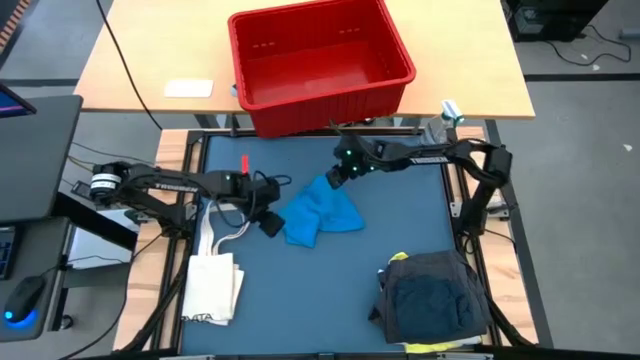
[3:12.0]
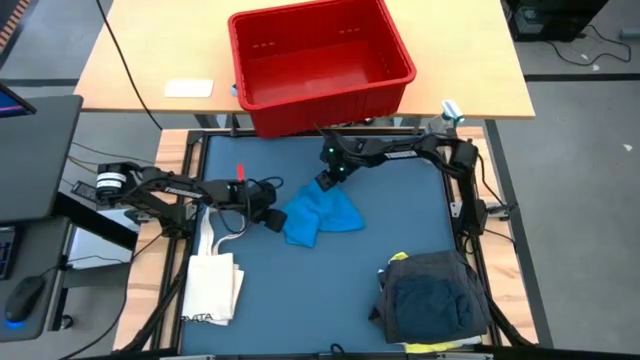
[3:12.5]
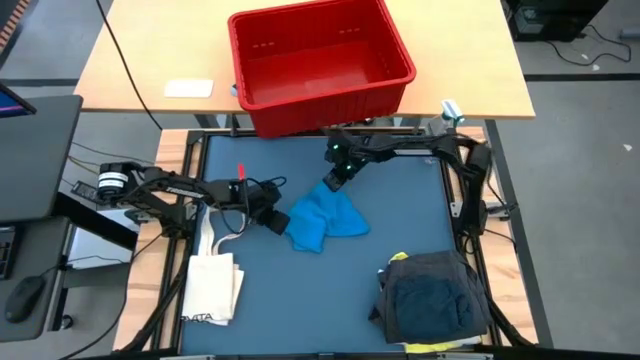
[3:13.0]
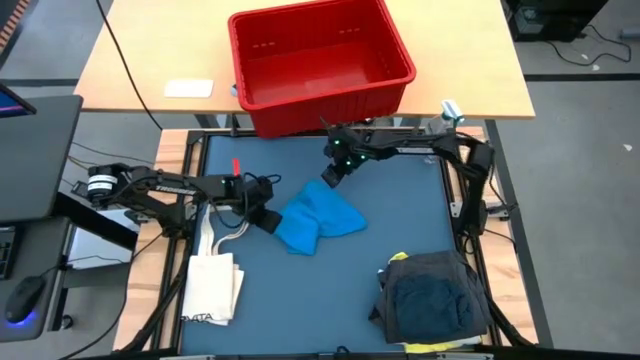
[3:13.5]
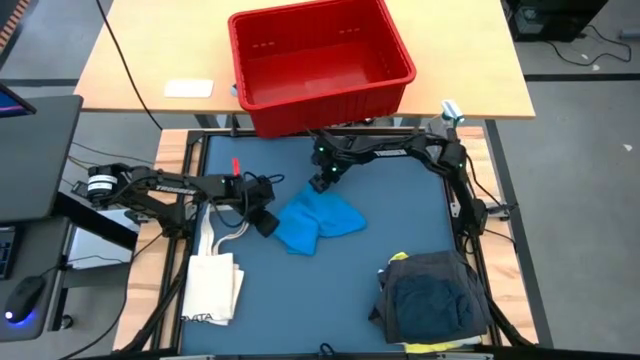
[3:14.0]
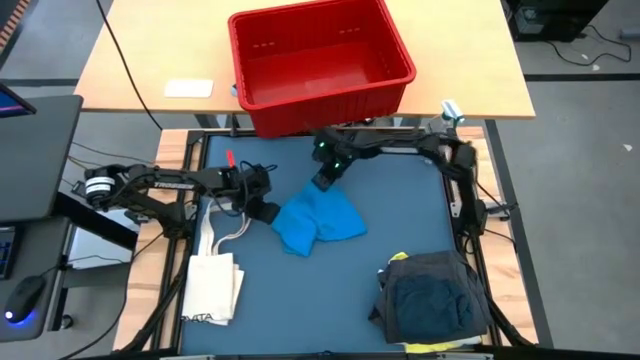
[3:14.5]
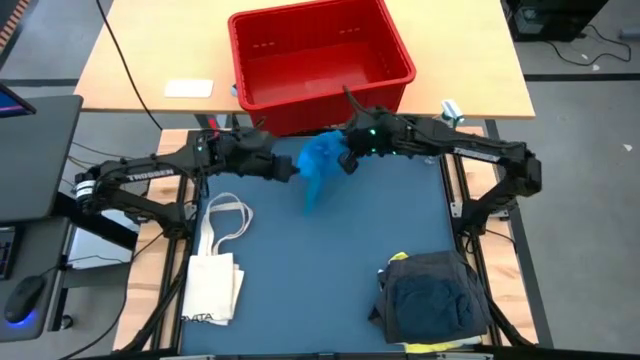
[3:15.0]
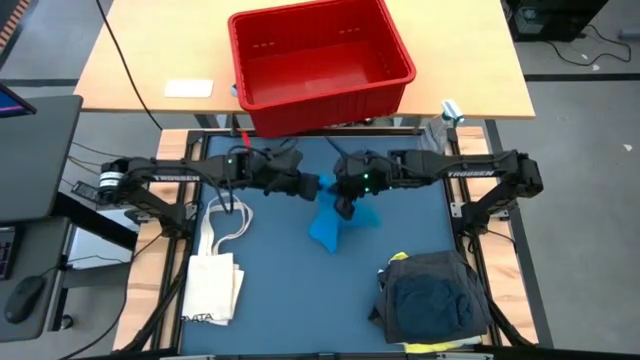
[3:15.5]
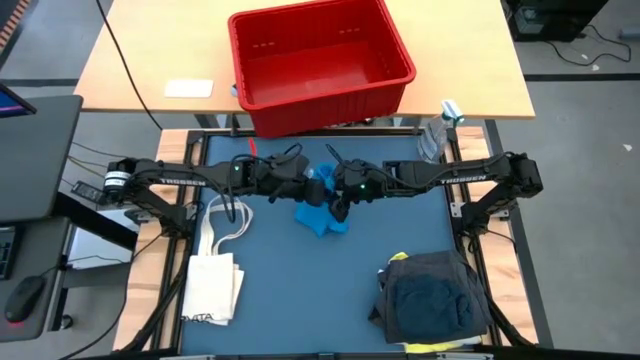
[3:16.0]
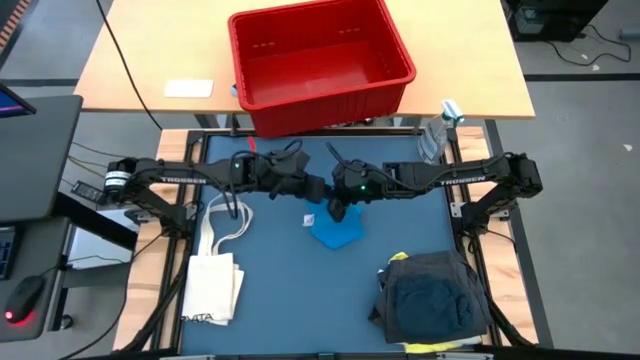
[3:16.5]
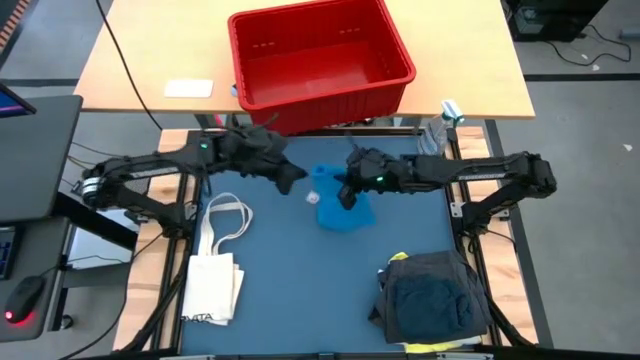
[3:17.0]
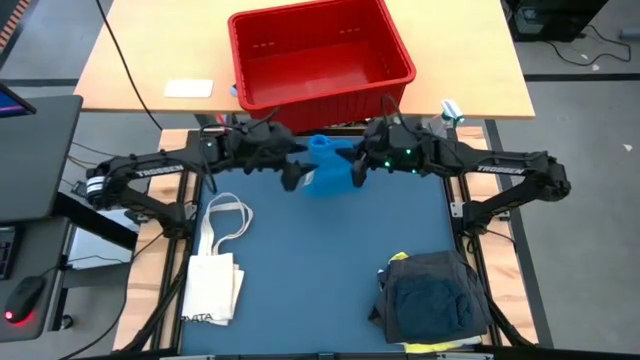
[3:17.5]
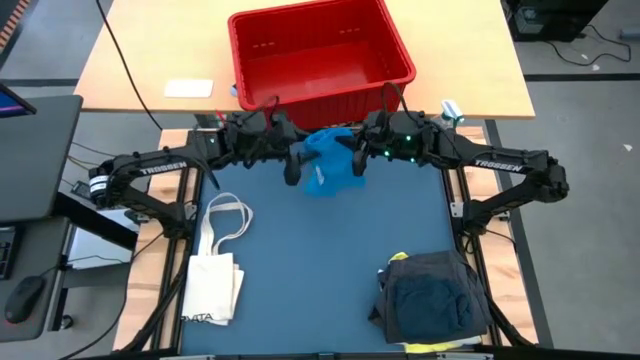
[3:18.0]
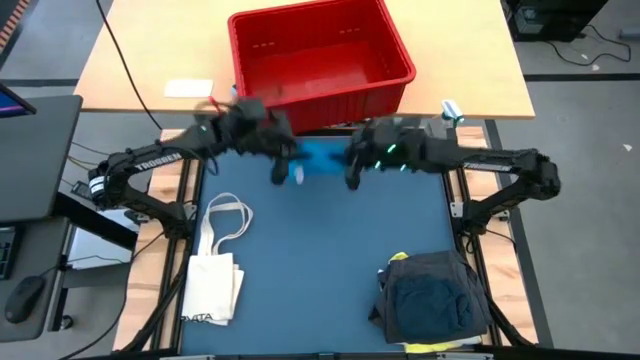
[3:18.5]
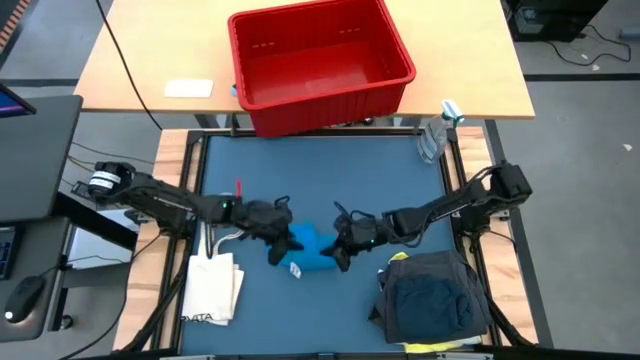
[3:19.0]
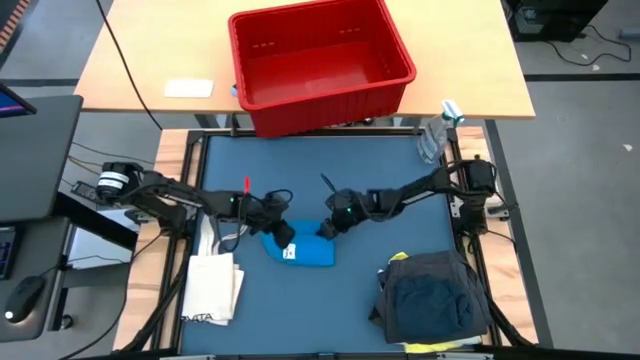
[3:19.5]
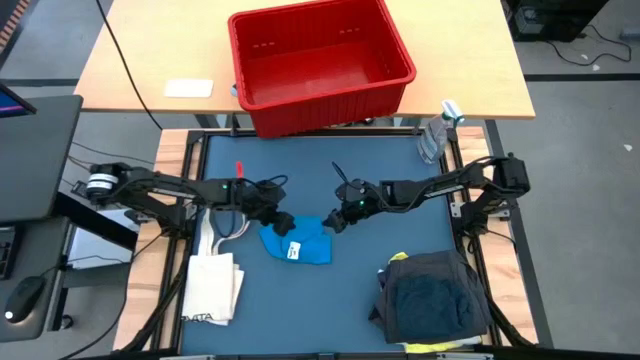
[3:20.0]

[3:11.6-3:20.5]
Task: Fold laundry
Fold the light blue boxer

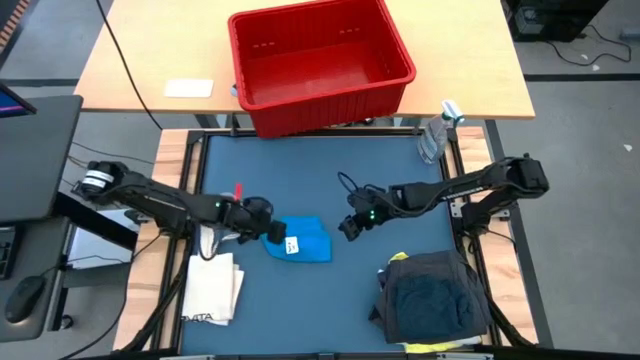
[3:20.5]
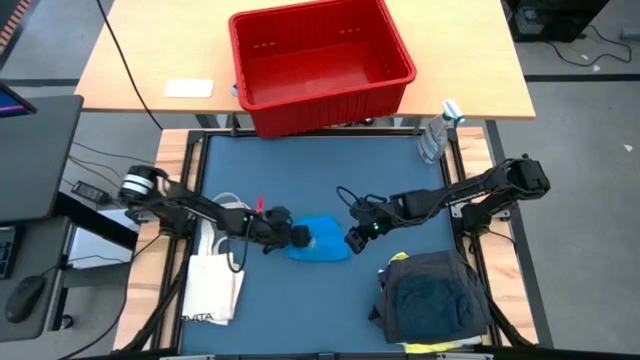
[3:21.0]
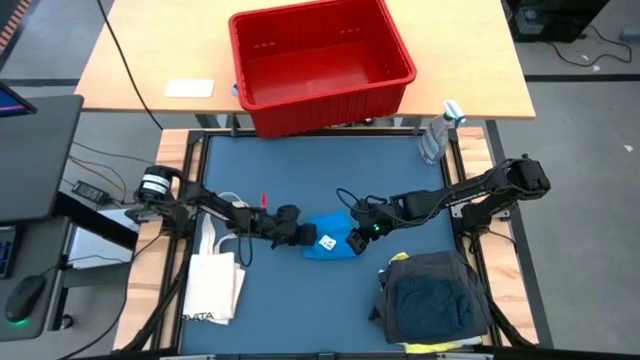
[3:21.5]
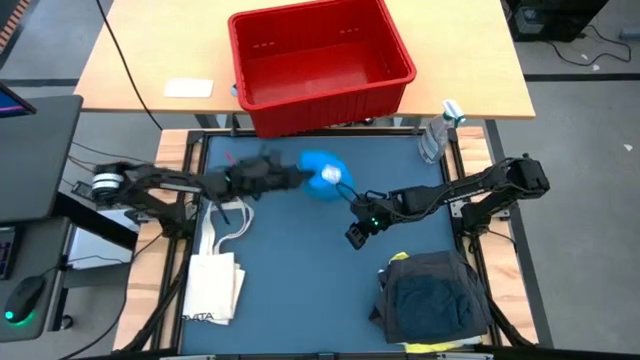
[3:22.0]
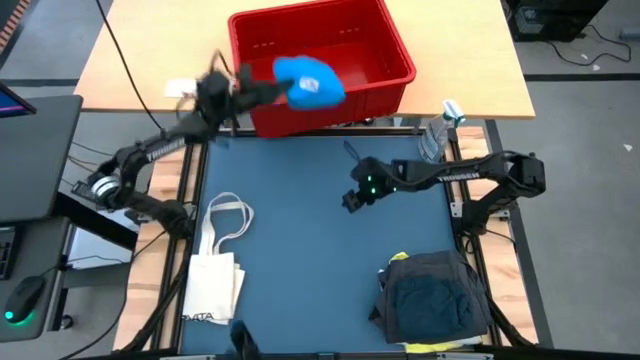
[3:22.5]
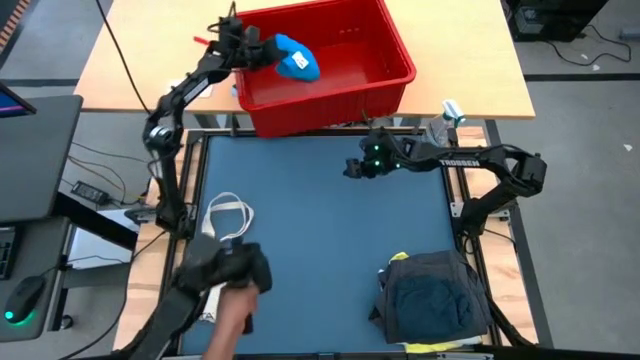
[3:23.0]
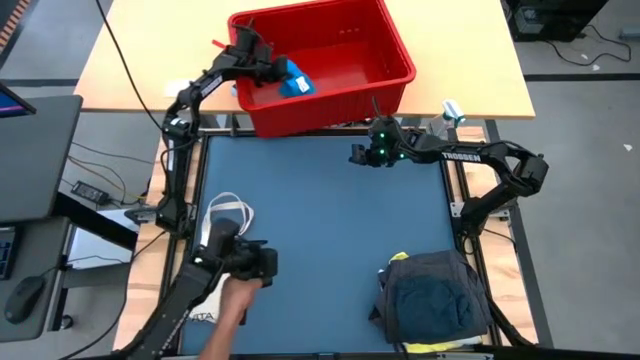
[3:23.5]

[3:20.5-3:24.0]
Put the light blue boxer into the red bin

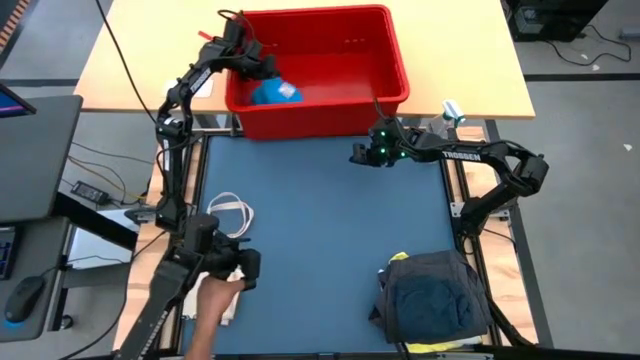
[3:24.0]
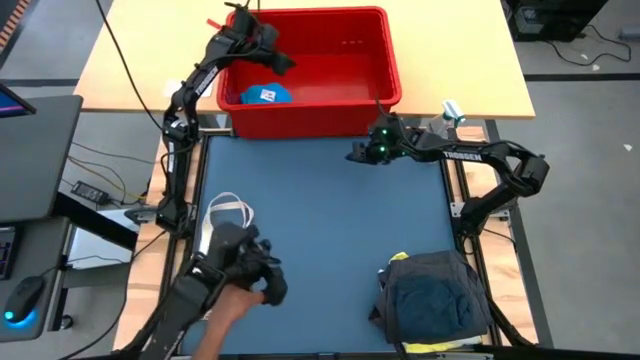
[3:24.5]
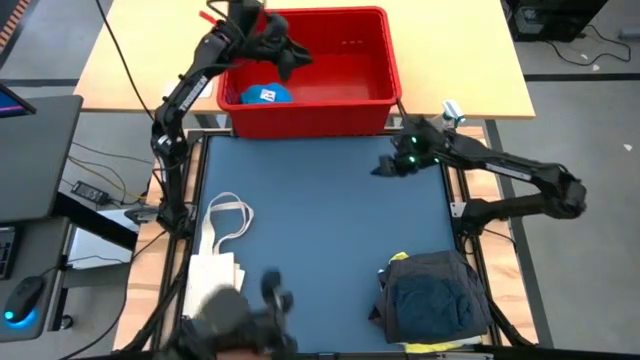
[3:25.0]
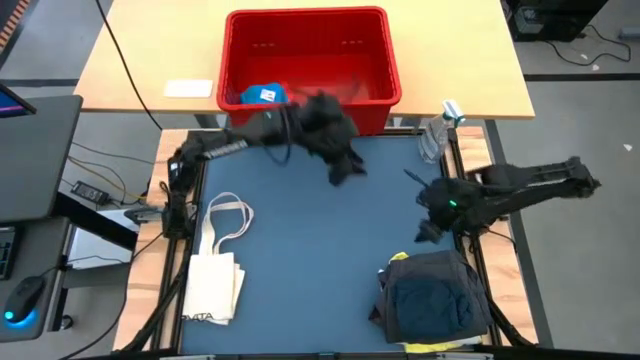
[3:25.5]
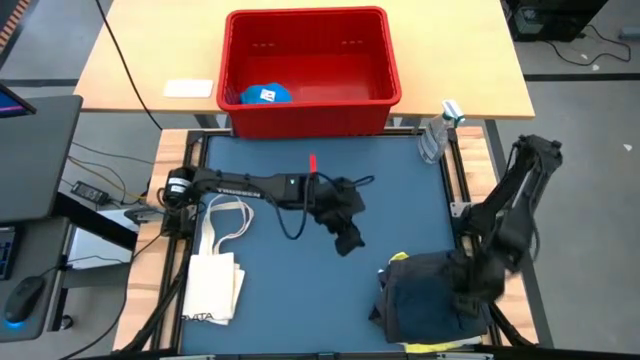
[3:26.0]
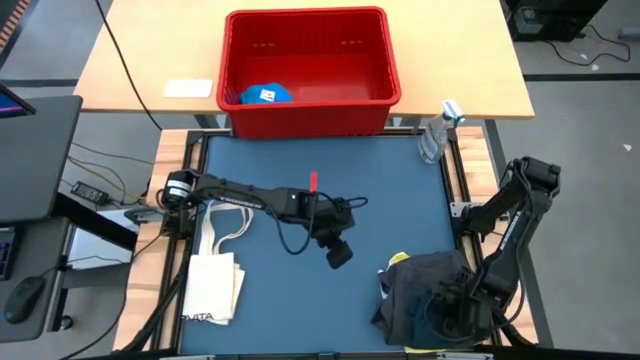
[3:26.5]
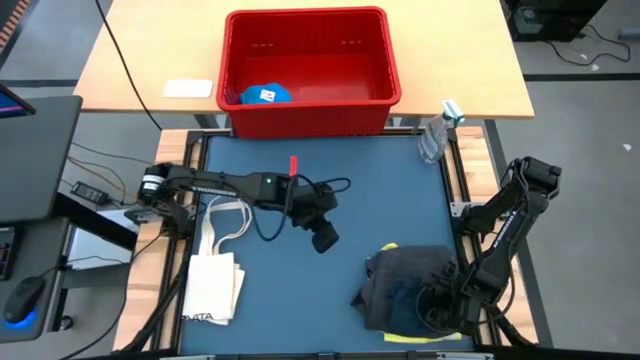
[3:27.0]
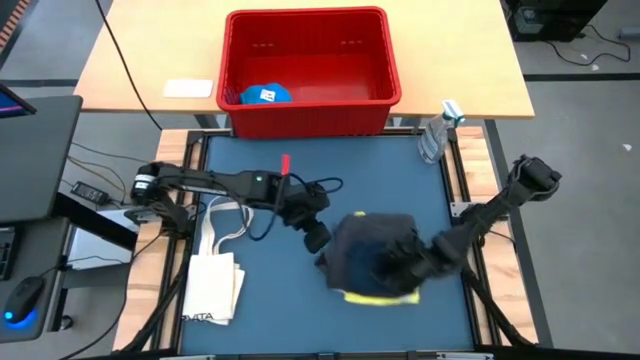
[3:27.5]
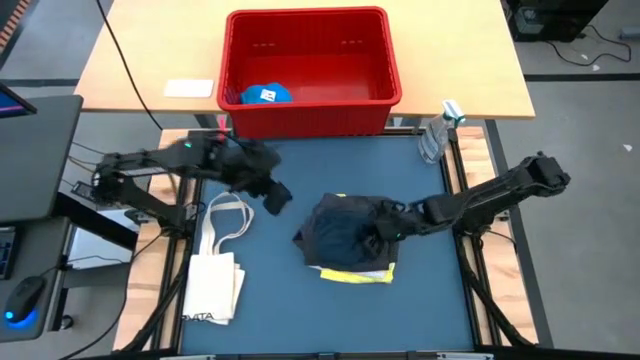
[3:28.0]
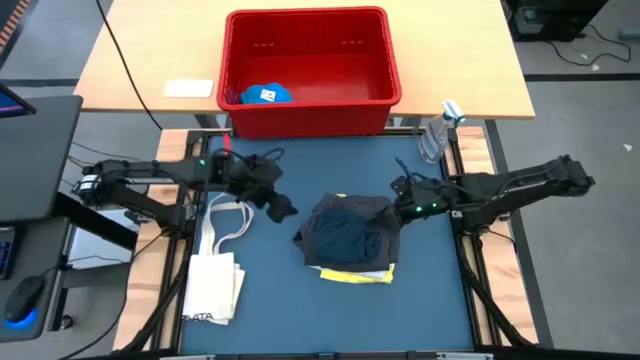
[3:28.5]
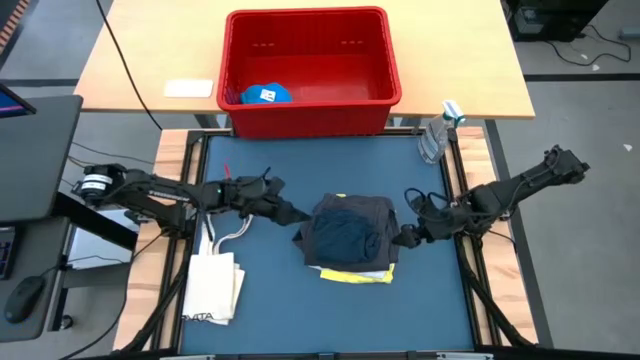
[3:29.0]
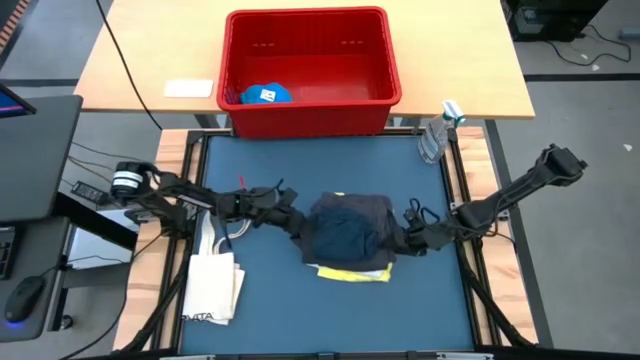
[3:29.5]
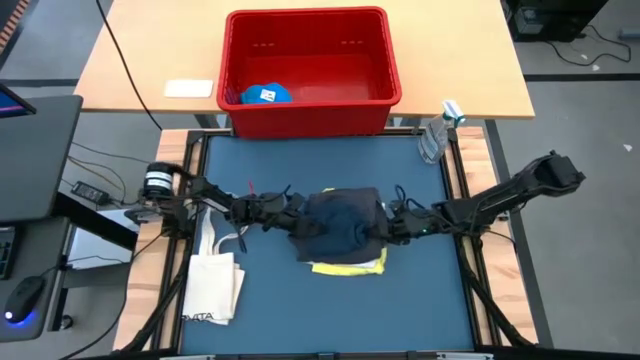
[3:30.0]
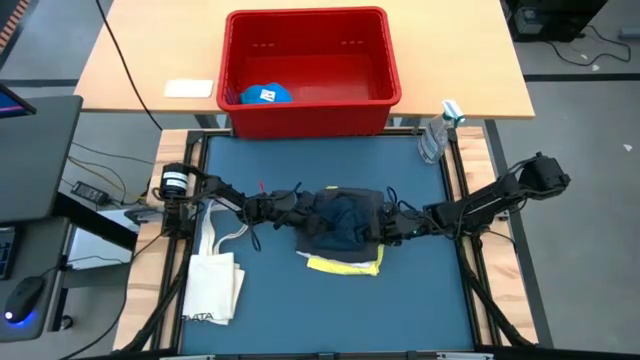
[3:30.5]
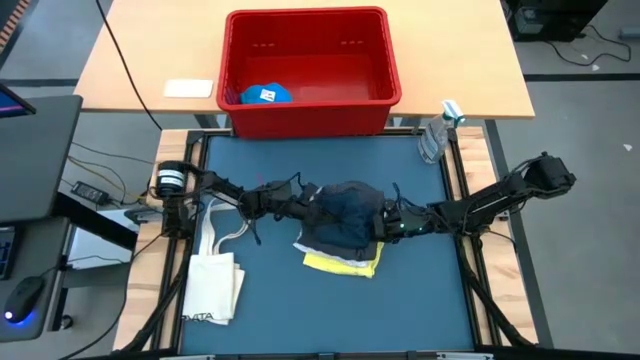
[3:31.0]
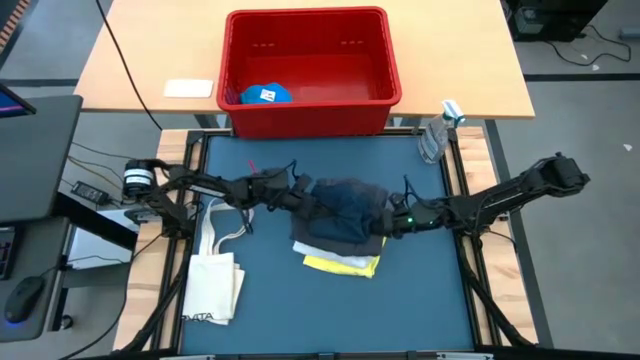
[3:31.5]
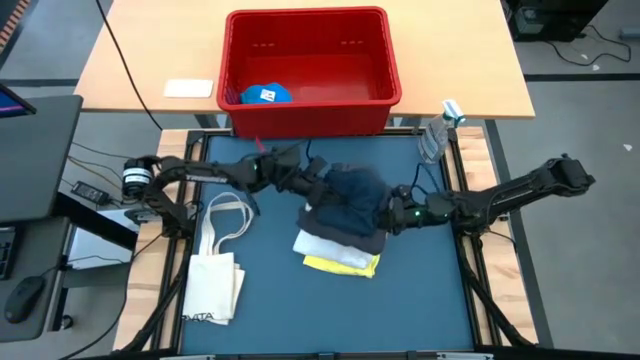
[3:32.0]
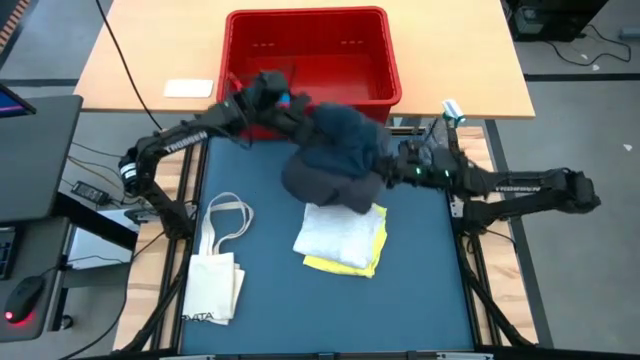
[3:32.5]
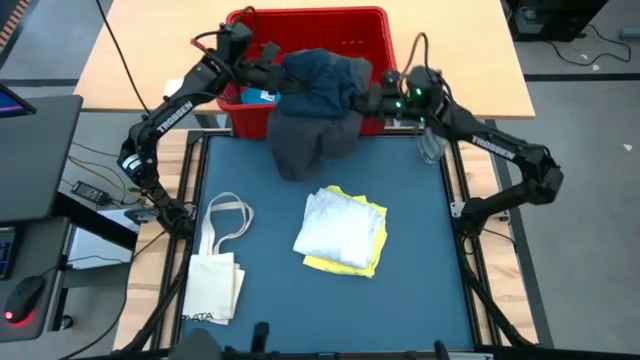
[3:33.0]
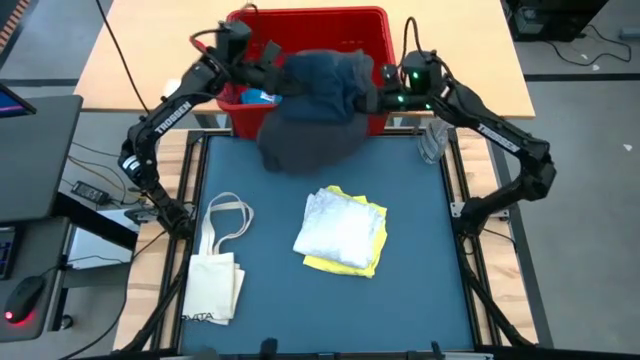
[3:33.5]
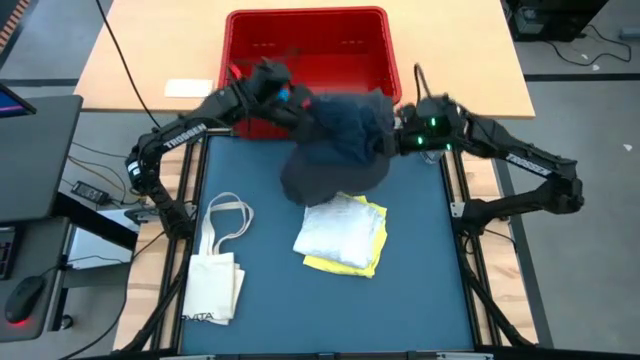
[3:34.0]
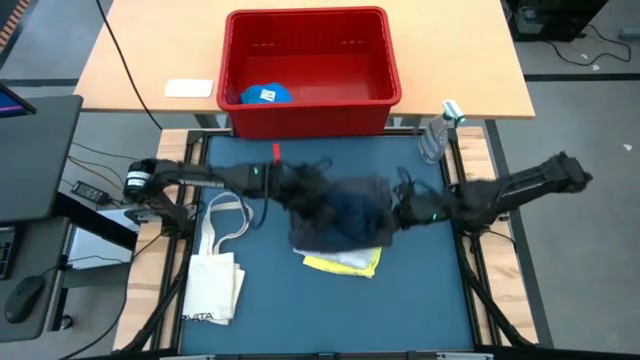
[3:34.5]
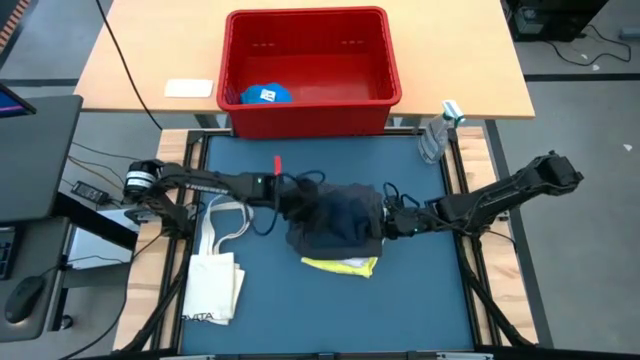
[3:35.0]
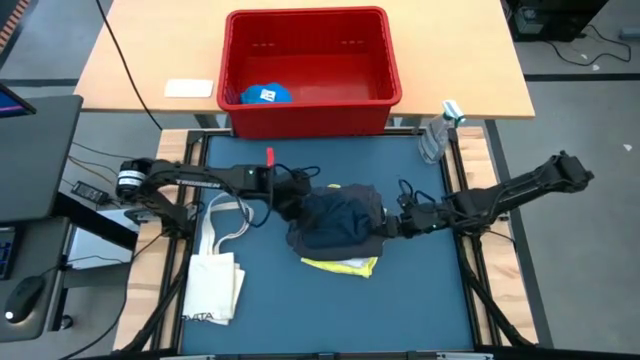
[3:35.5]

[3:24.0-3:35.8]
Put the clothes into the red bin
